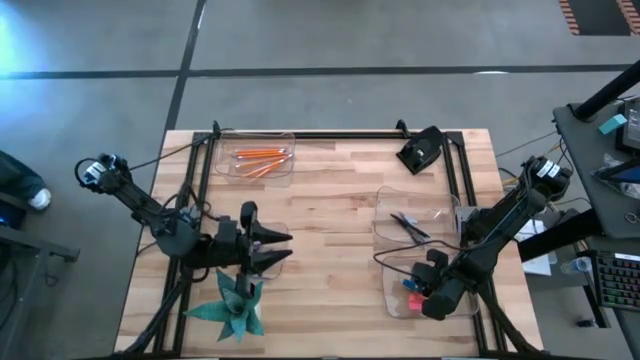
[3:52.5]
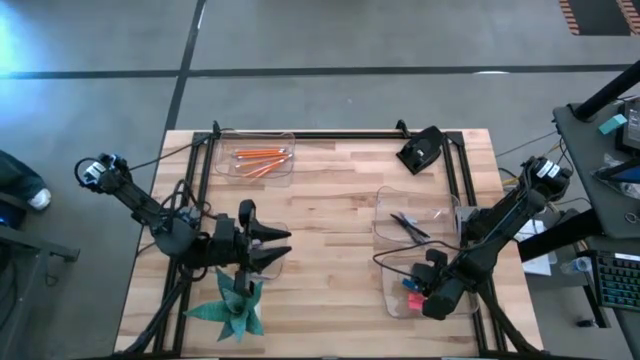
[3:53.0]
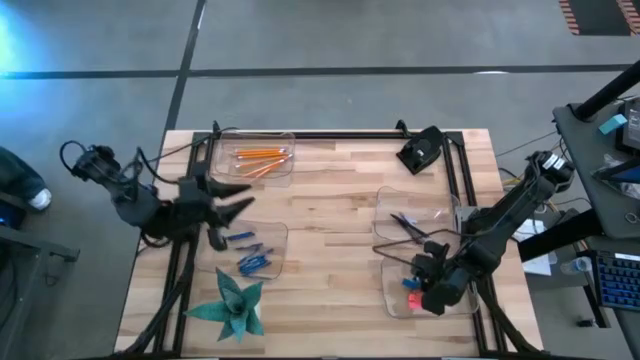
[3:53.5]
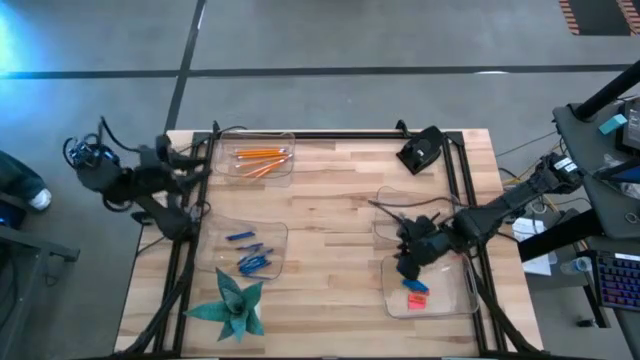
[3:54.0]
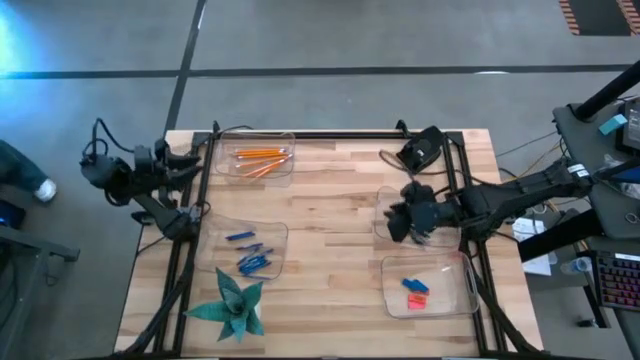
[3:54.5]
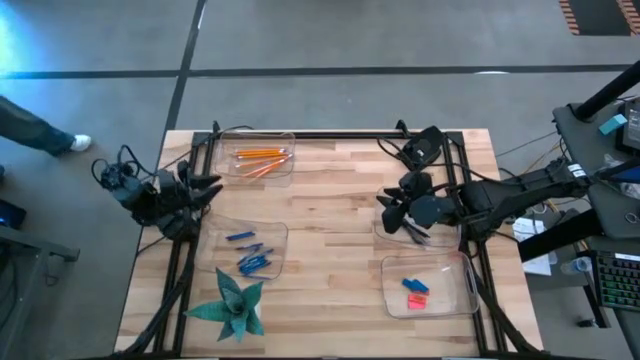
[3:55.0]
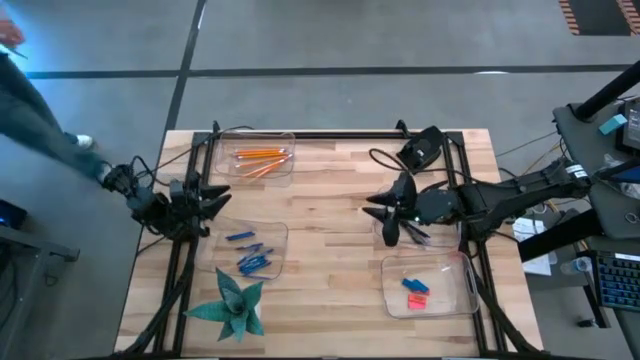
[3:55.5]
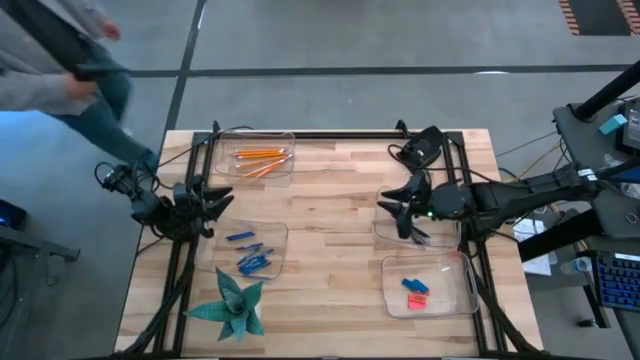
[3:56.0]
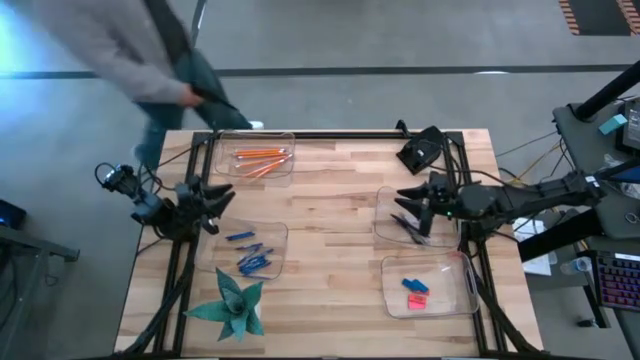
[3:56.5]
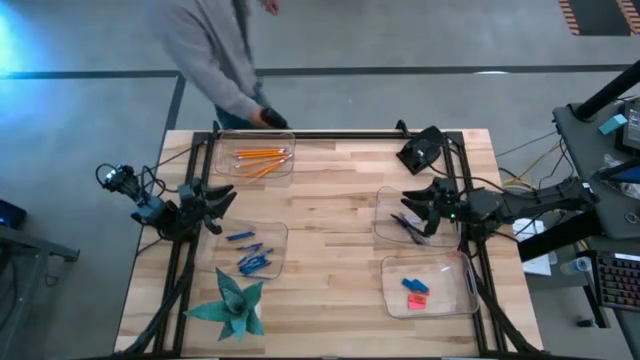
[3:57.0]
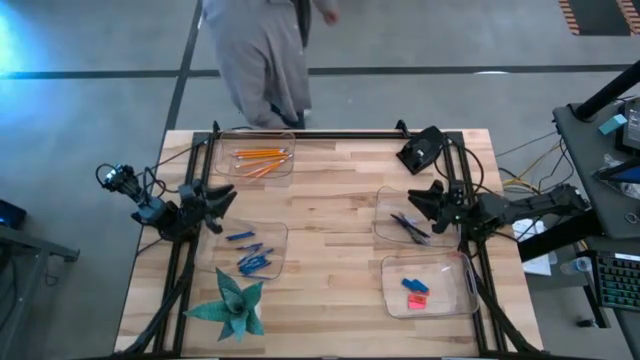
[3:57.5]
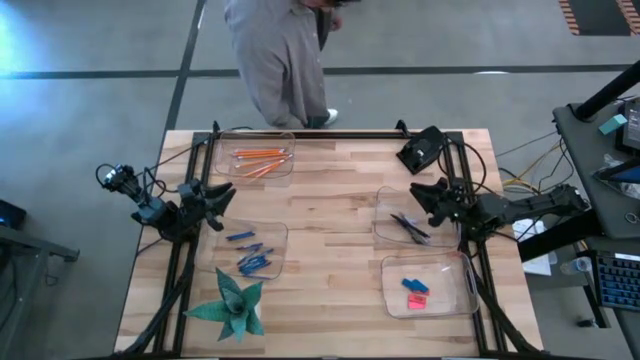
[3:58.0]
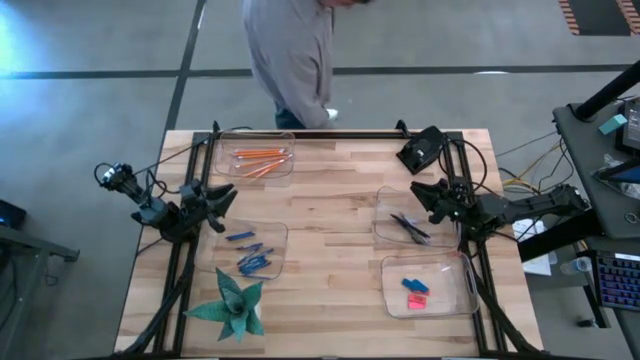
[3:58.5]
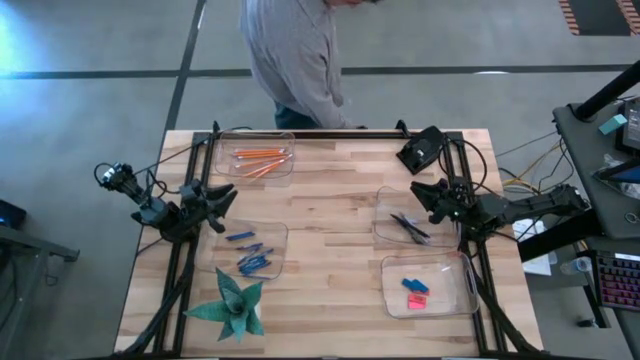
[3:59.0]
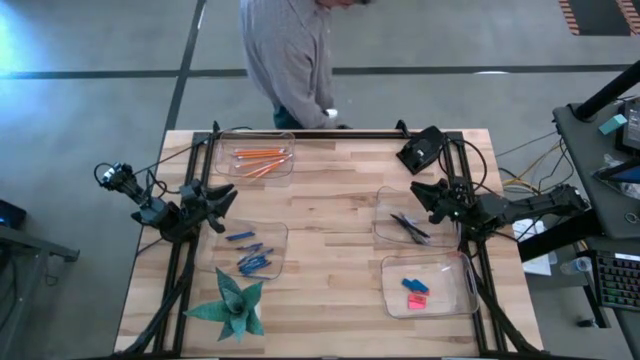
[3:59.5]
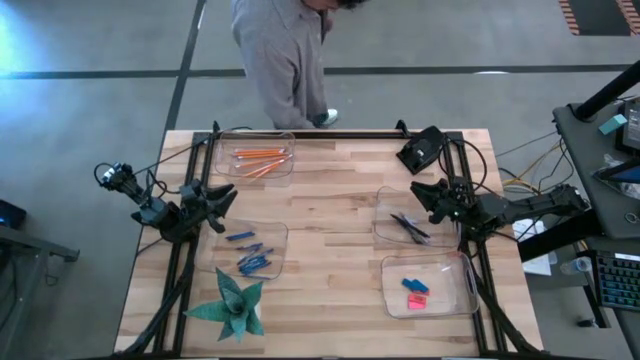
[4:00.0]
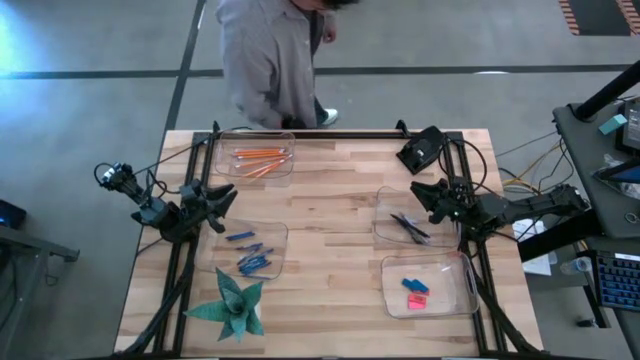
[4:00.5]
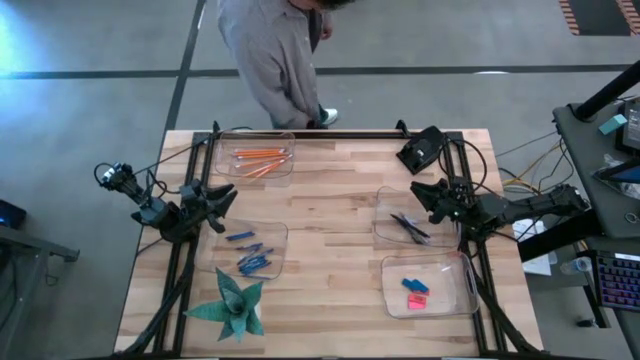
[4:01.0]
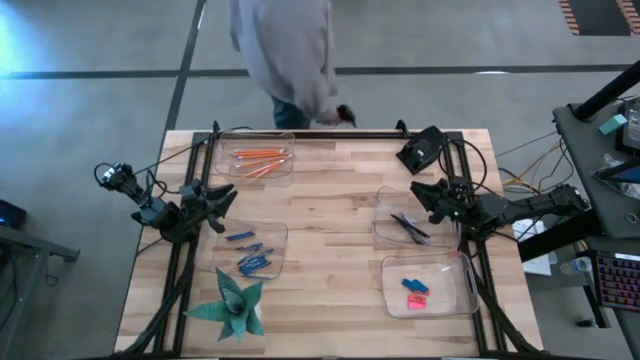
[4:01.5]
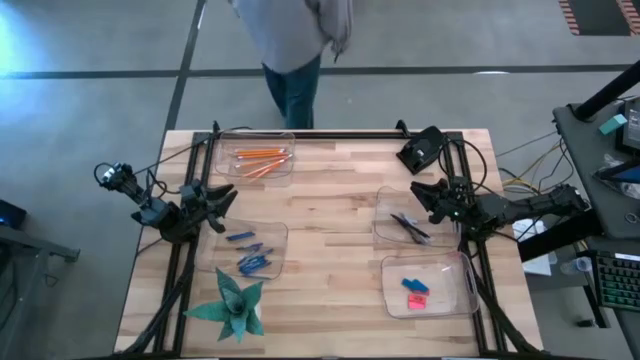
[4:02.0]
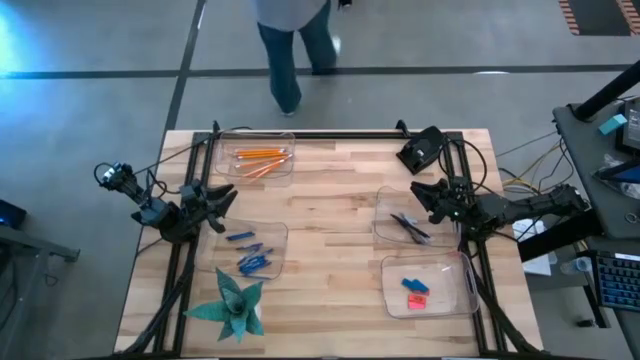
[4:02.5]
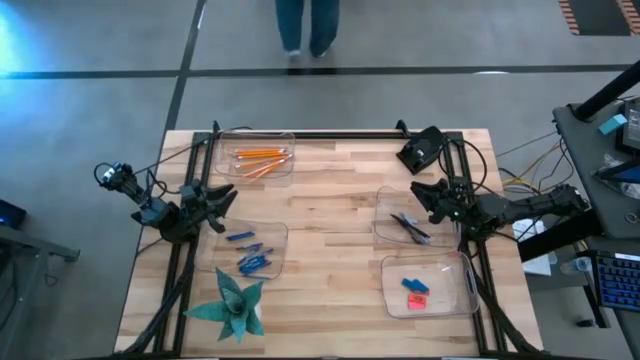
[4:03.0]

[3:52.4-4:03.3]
Task: Sort crayons/erasers/pens/pencils in bins
Return to Home Position

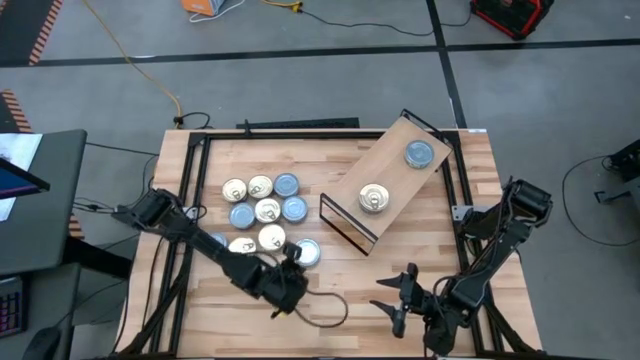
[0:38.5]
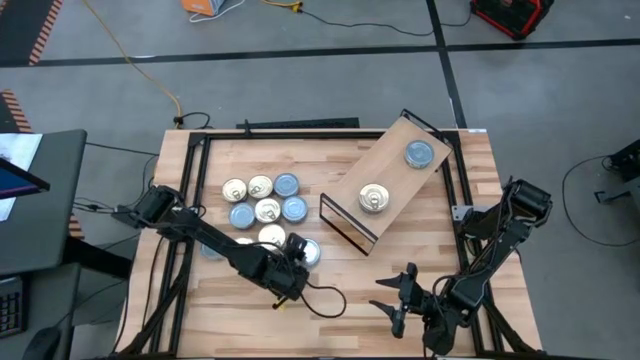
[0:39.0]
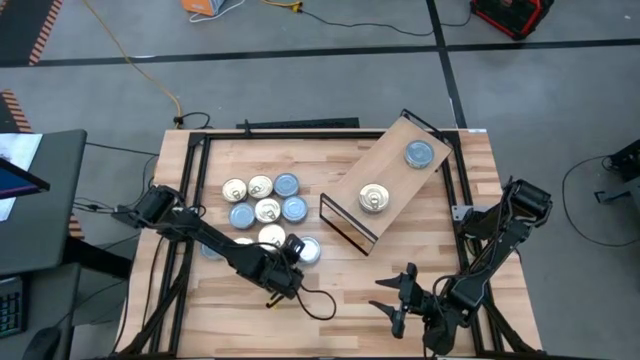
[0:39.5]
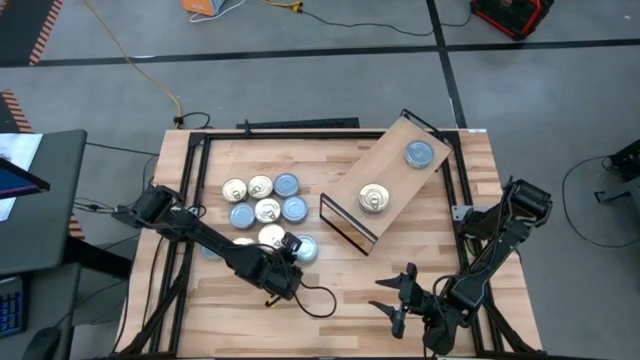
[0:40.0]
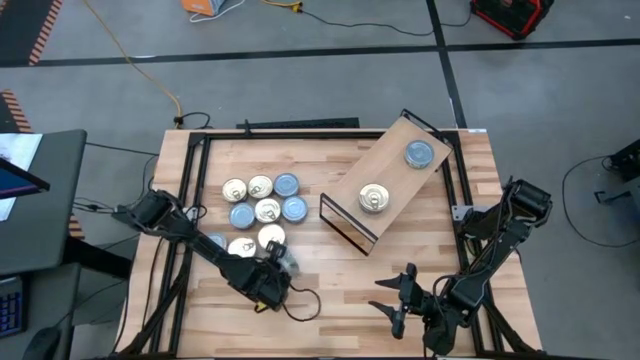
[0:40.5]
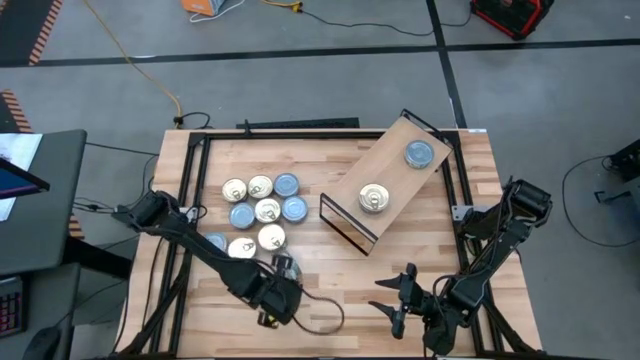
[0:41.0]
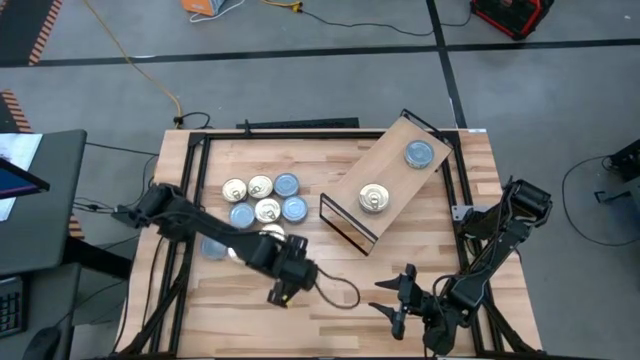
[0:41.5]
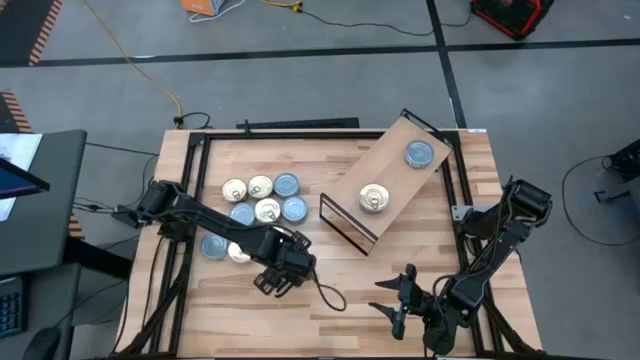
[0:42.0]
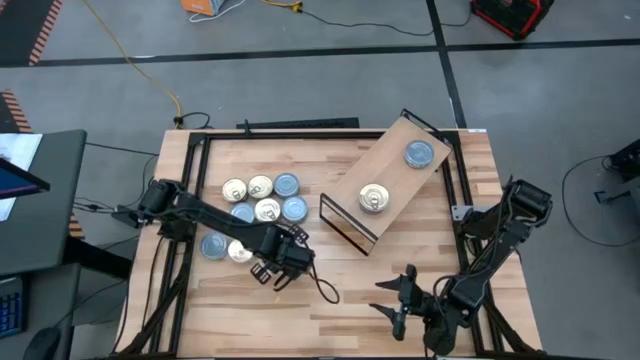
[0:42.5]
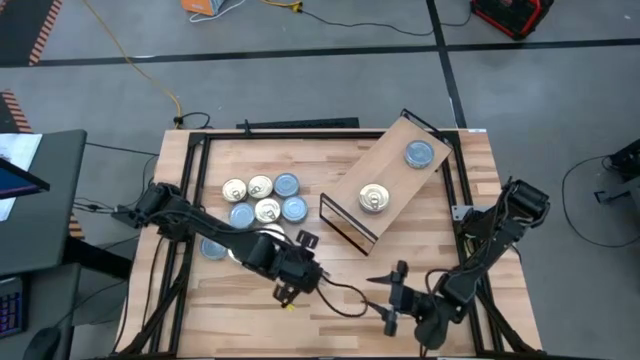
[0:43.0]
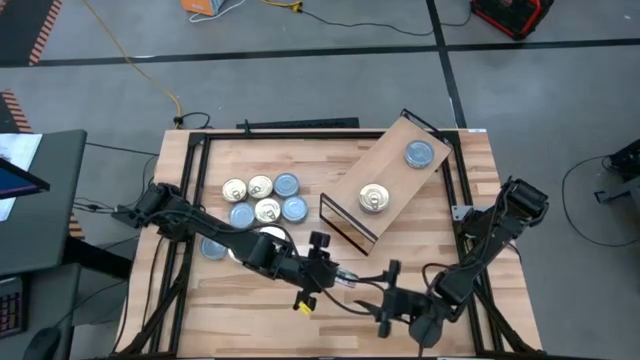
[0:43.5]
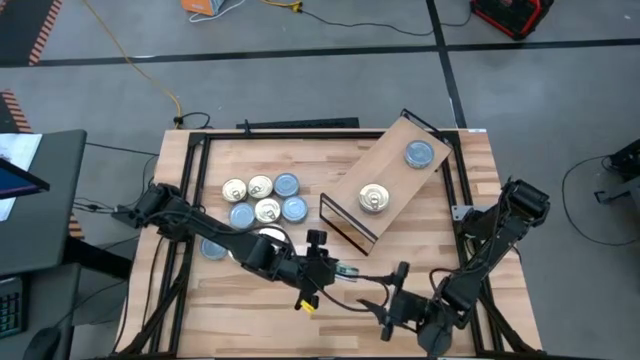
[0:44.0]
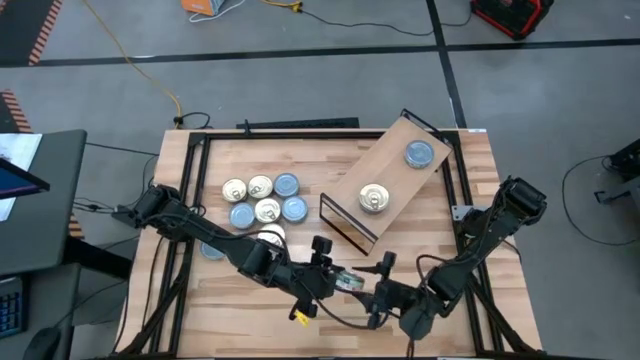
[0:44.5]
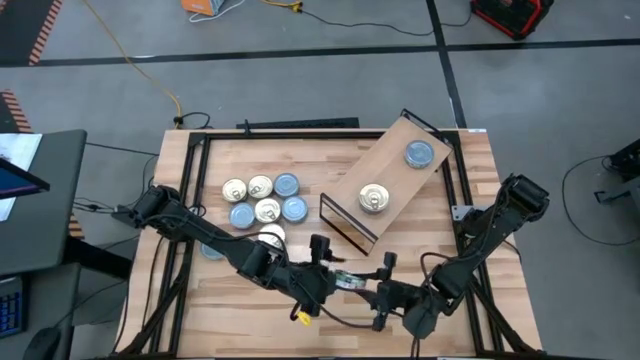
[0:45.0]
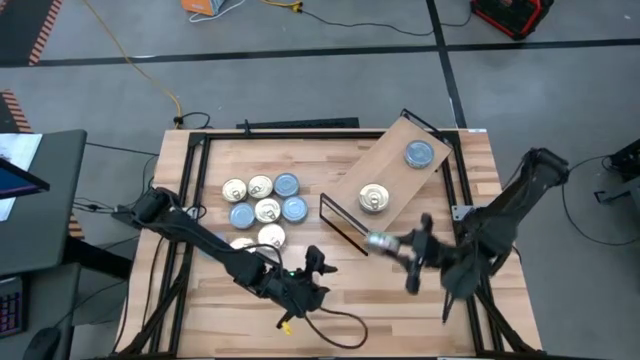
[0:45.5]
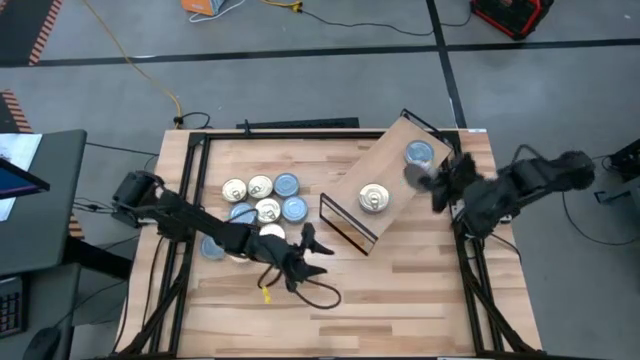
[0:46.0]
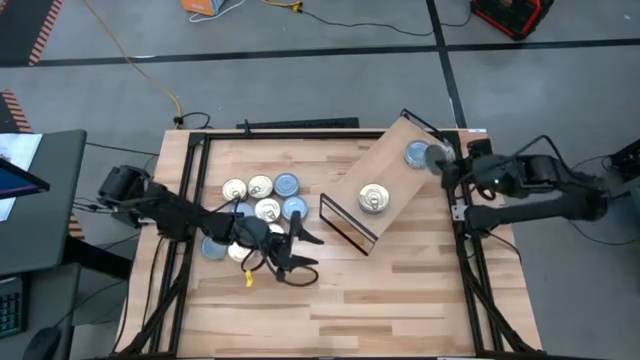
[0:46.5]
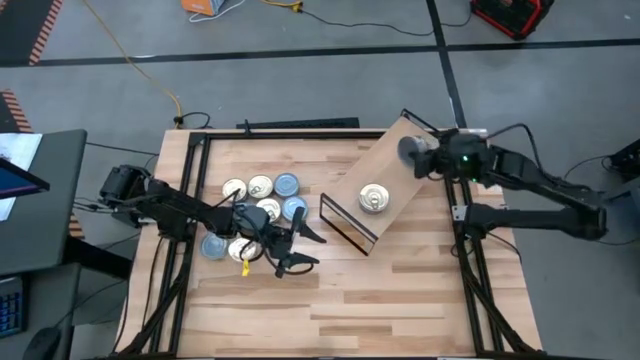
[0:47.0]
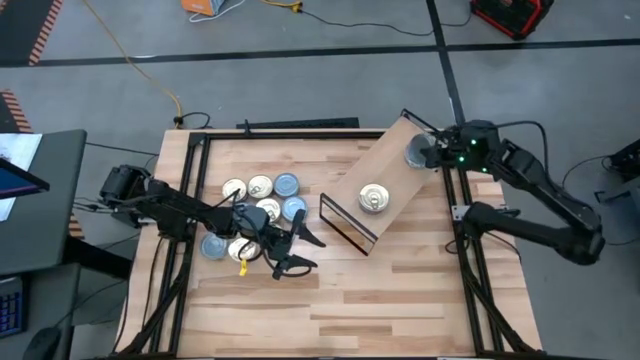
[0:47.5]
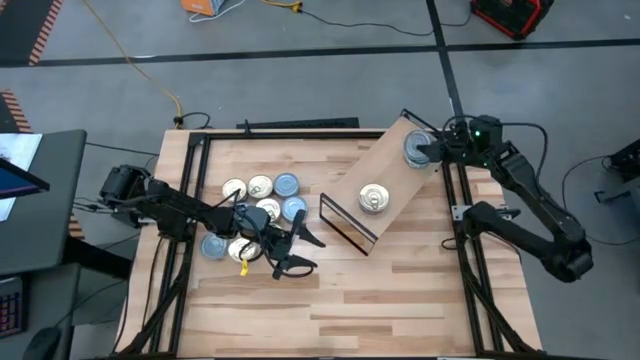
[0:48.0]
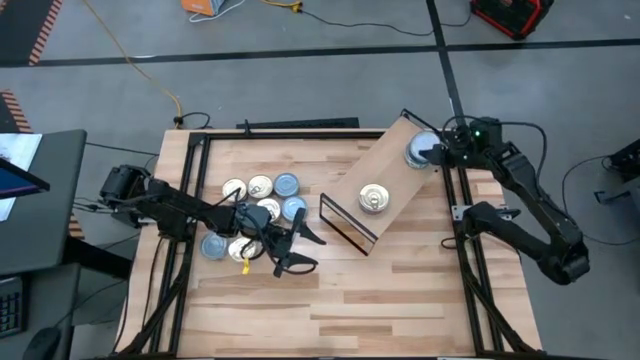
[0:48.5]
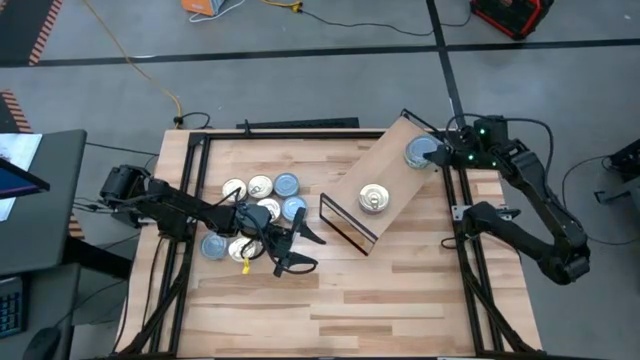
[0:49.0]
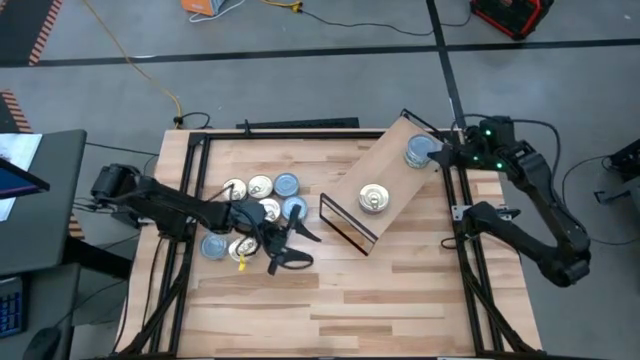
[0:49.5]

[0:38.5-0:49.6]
Task: Stack canned seafood by type on shelf
Stack the green tuna can on the shelf
